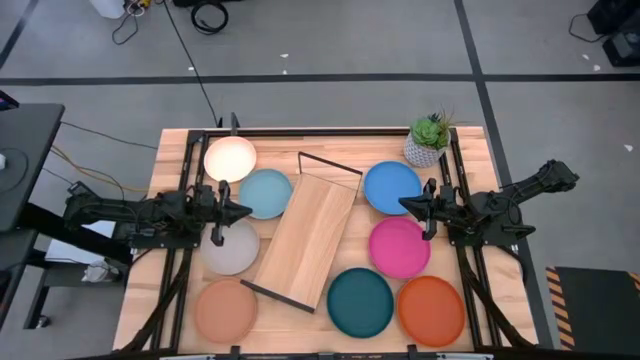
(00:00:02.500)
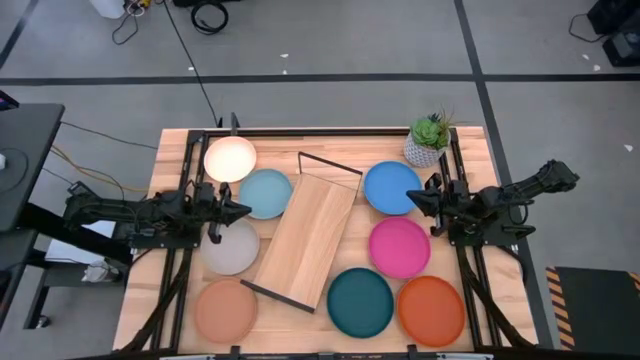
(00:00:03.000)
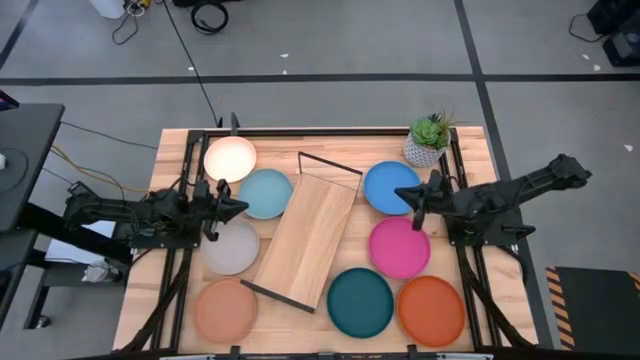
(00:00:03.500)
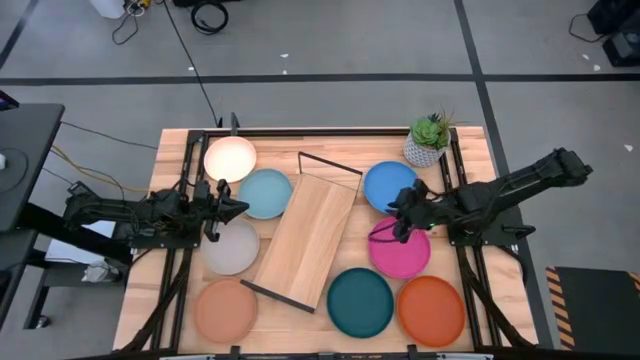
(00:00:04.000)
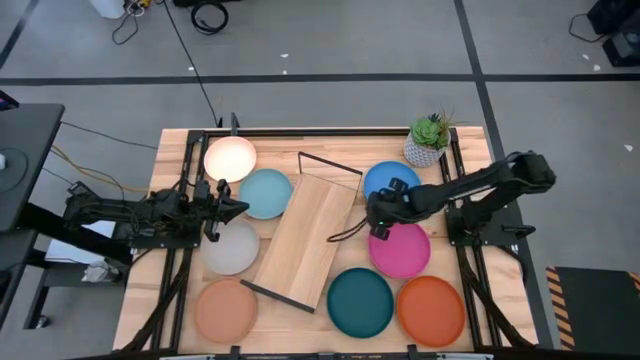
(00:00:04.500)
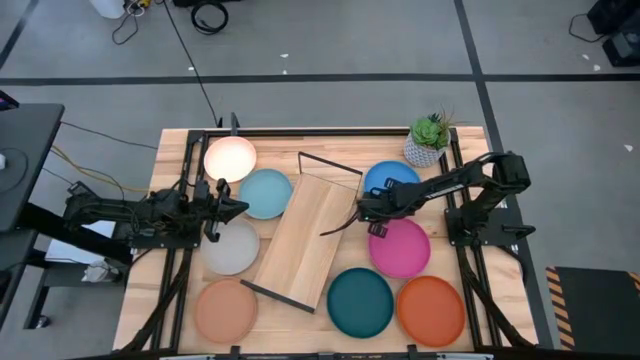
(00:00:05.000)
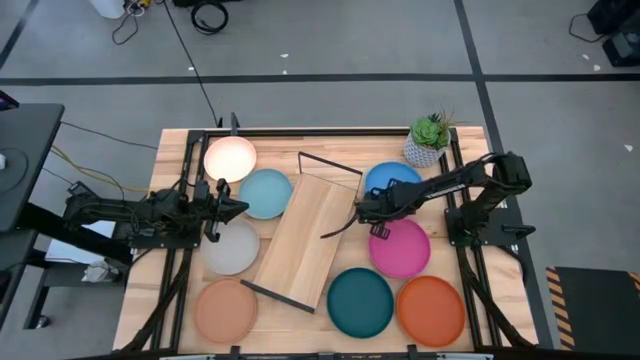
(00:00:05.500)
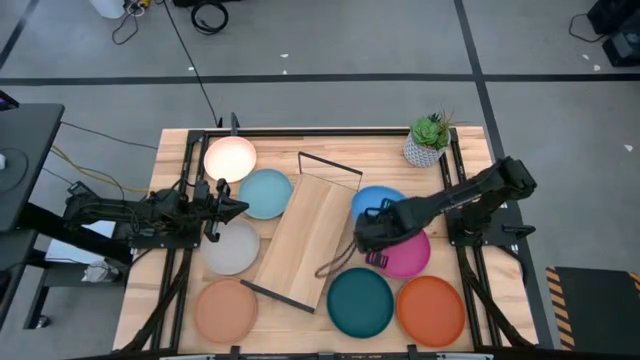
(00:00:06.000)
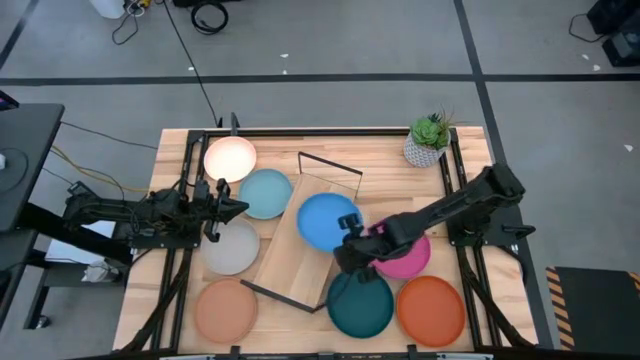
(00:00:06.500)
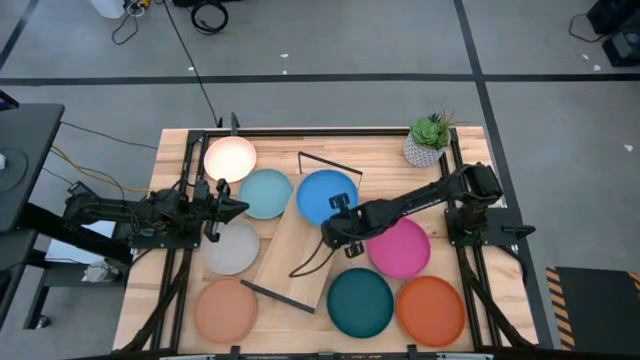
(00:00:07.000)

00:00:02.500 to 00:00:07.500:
Task: Place and stack plates onto a shelf
Put the blue plate on the shelf

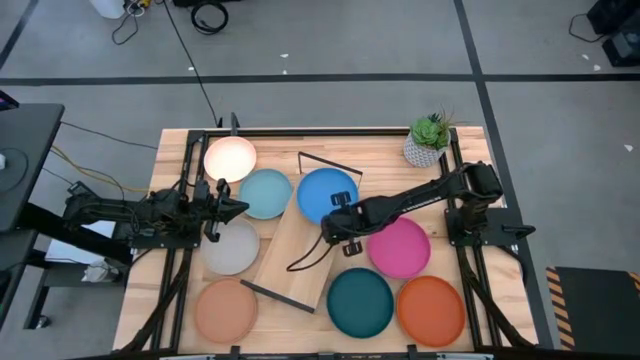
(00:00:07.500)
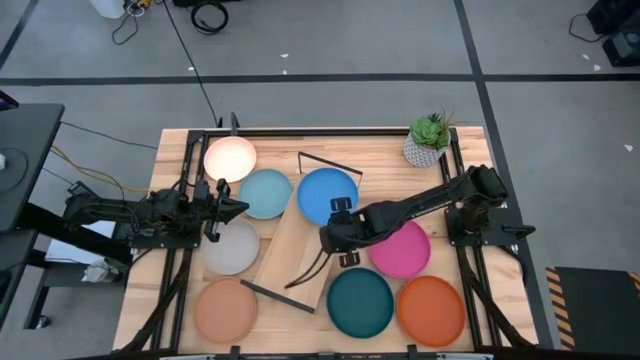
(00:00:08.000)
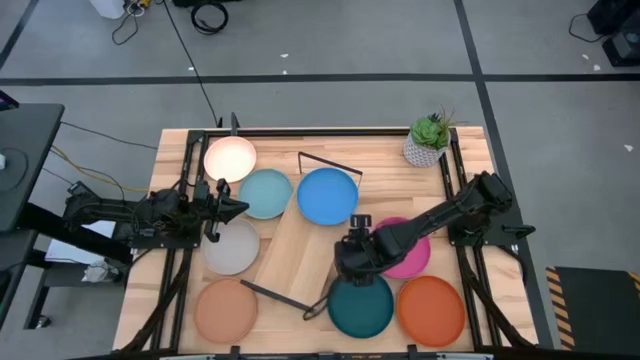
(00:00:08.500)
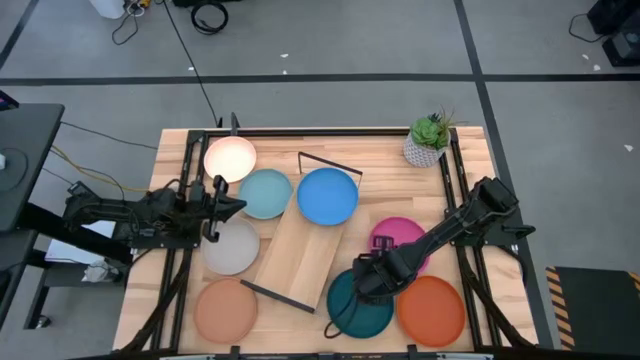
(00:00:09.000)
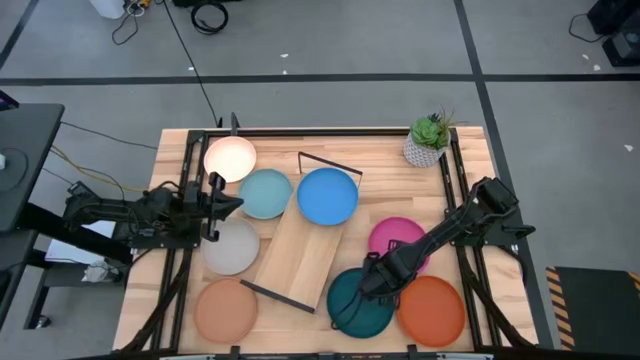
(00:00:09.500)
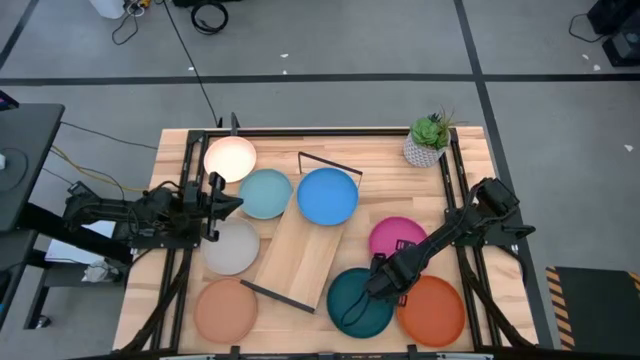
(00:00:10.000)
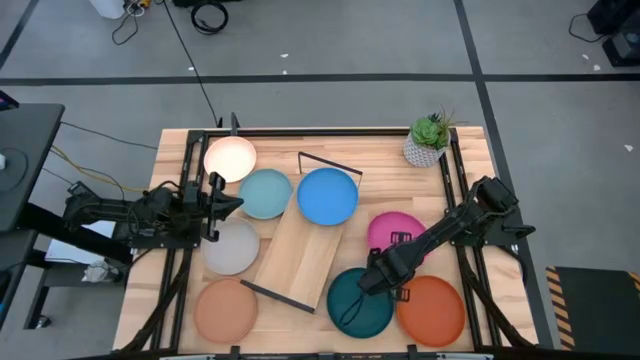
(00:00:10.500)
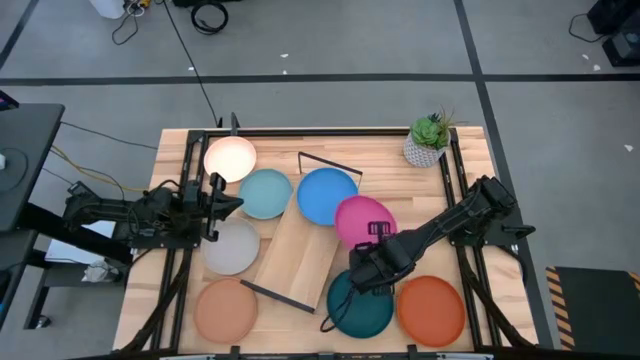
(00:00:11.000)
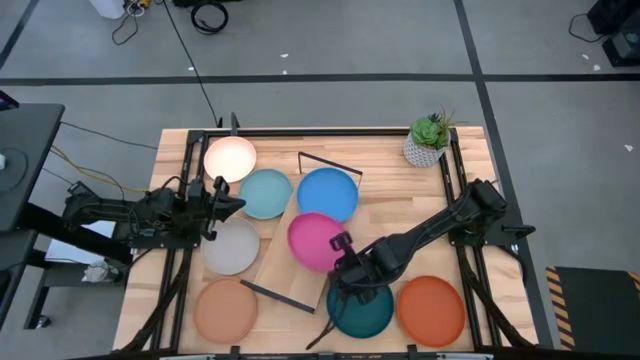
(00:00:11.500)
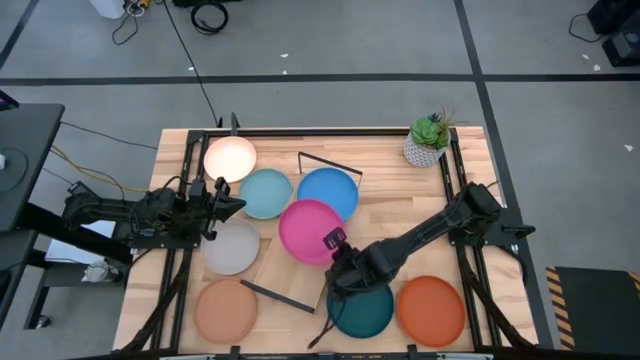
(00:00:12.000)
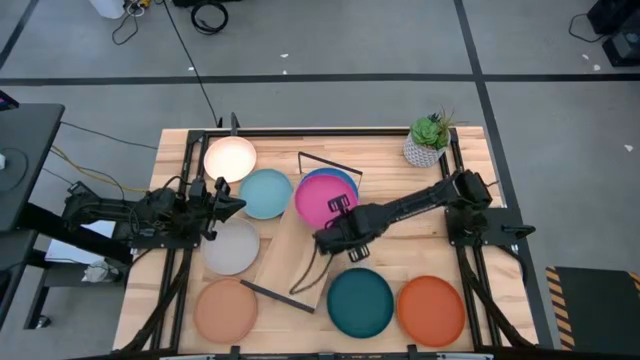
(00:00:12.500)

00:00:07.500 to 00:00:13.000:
Stack the pink plate on top of the blue plate on the shelf

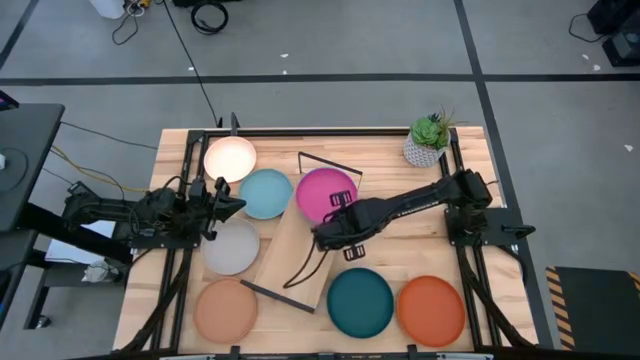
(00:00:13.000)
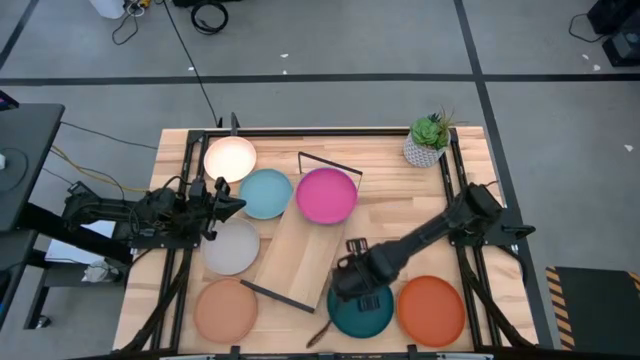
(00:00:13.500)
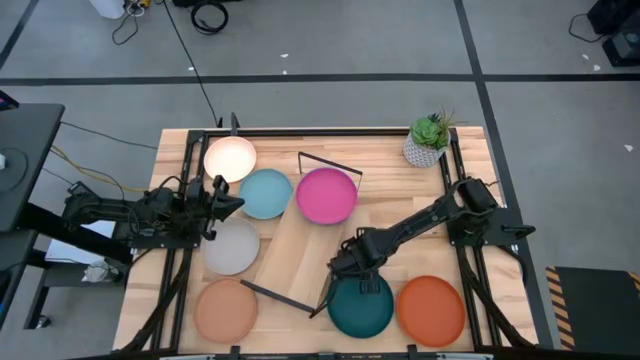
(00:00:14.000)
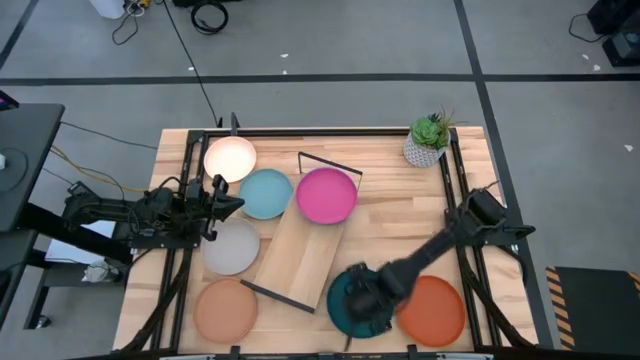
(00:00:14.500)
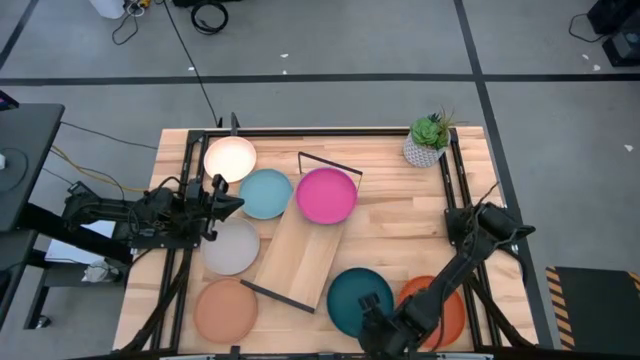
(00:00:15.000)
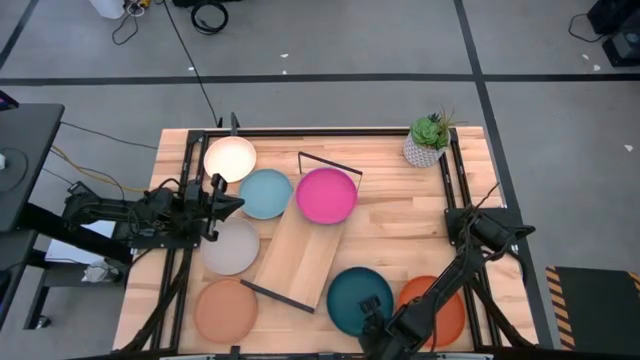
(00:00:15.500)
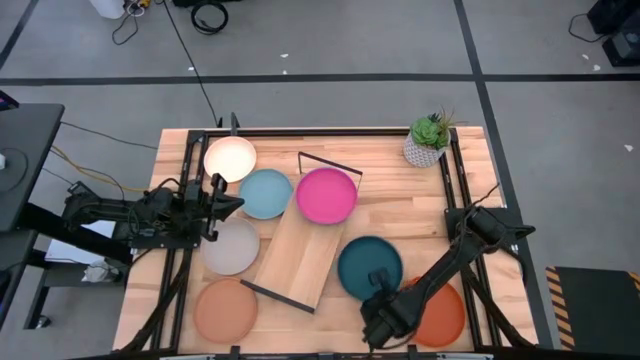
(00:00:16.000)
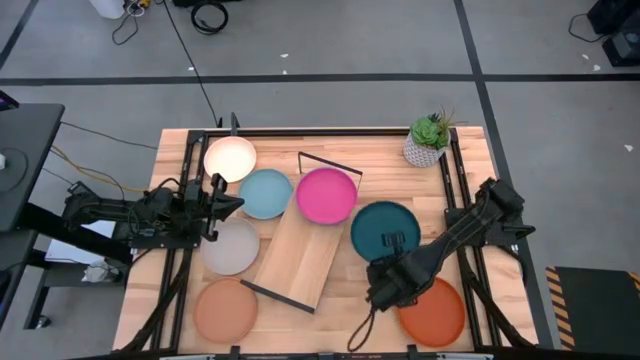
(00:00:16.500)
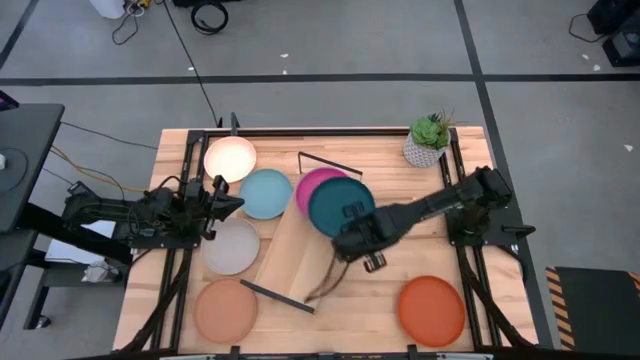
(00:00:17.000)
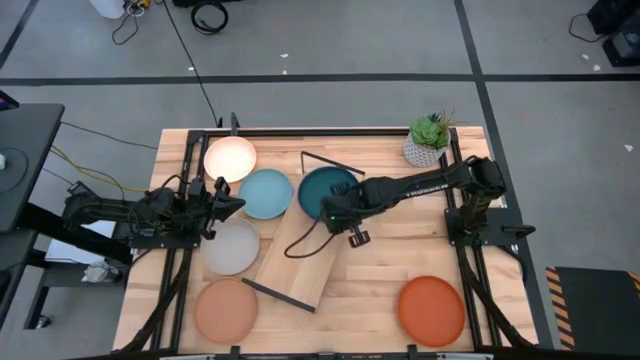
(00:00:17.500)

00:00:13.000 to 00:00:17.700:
Stack the green plate on top of the pink plate on the shelf

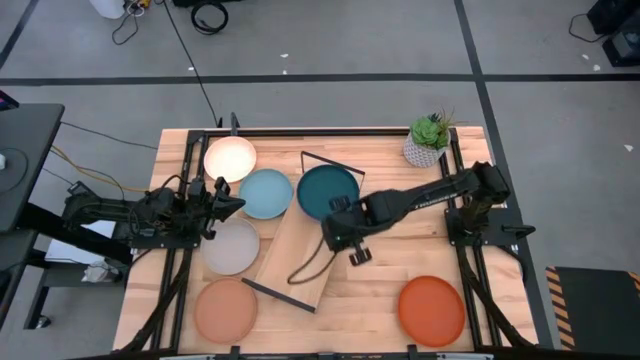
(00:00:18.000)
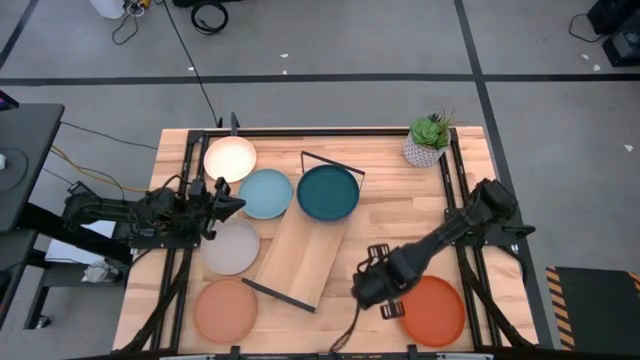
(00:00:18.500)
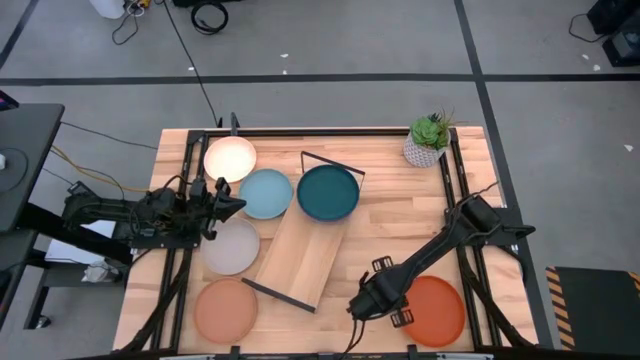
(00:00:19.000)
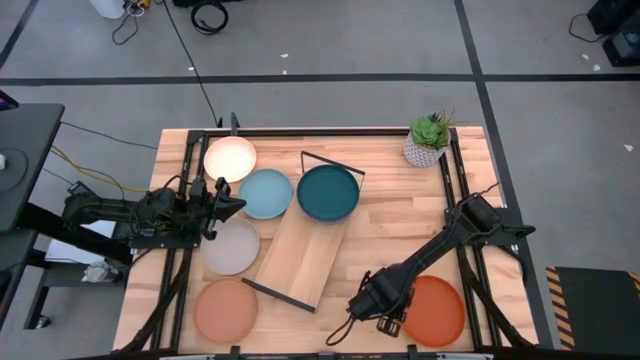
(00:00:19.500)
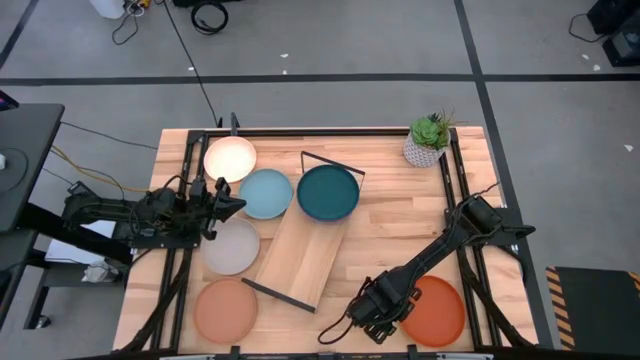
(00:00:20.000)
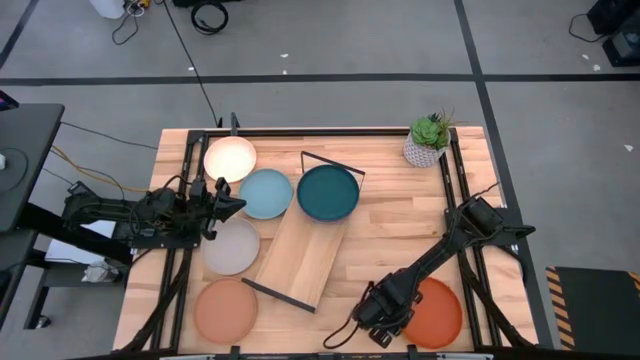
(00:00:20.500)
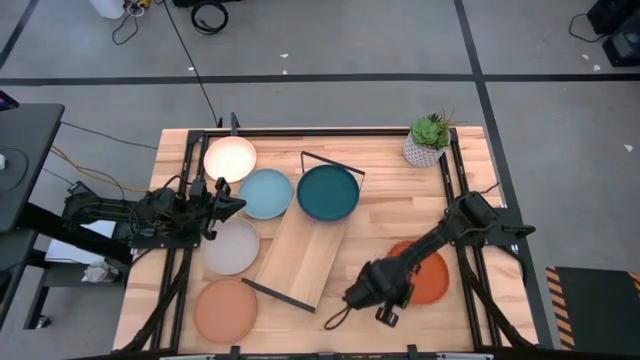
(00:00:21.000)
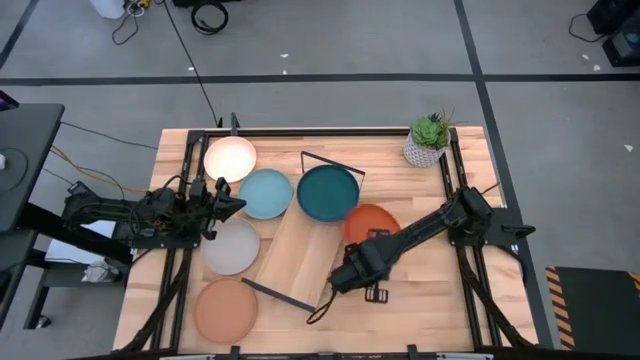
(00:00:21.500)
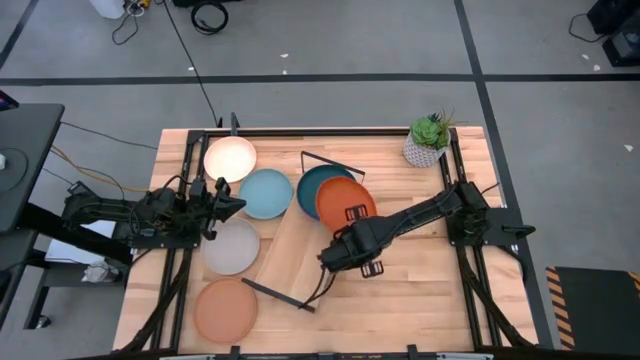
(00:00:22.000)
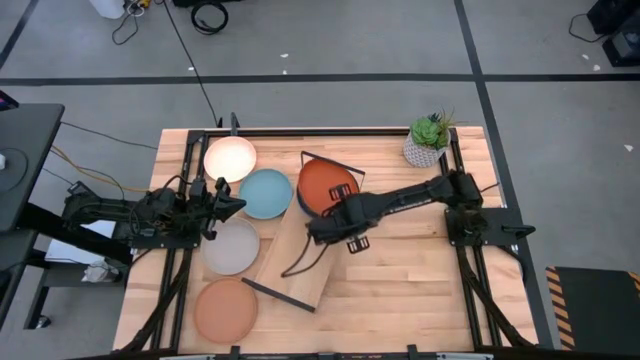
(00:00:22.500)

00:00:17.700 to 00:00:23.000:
Stack the orange plate on top of the green plate on the shelf

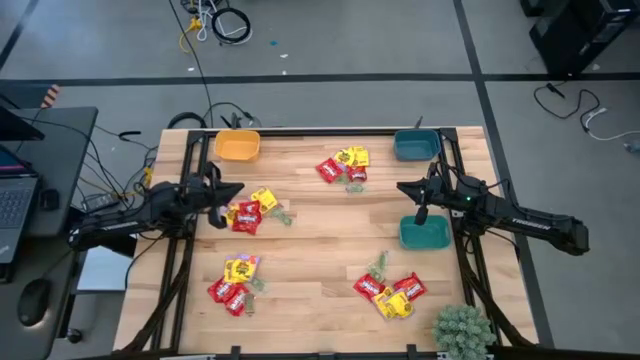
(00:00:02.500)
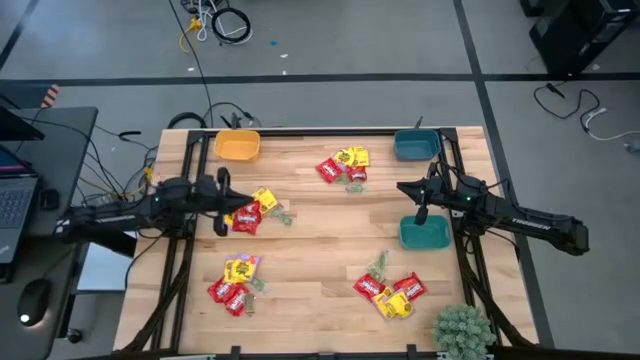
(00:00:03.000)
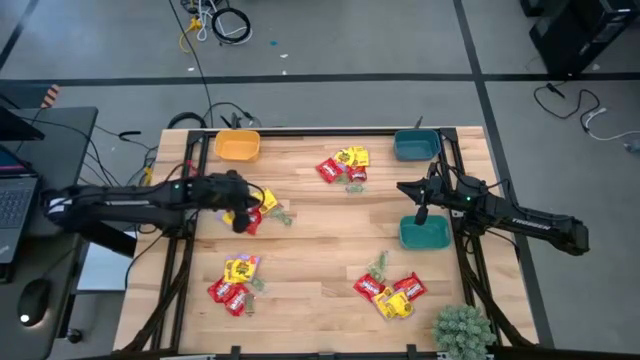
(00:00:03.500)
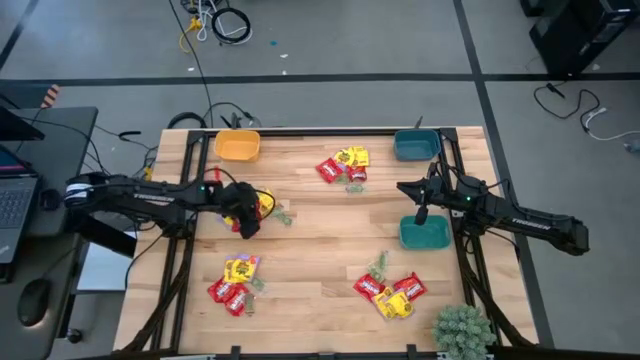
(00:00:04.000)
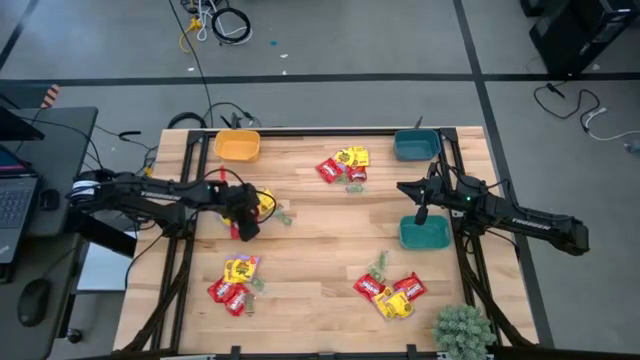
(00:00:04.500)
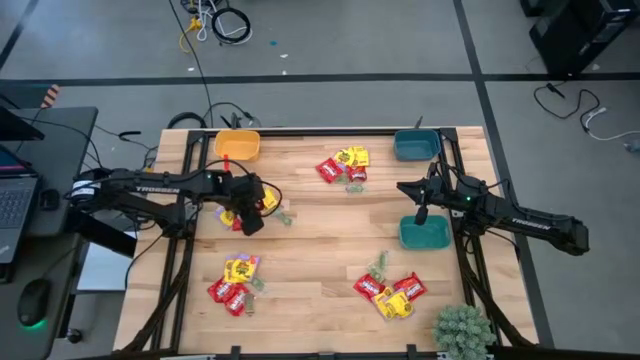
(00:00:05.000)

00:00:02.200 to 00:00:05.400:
Task: Sort candy
Put the red candy into the yellow bin
